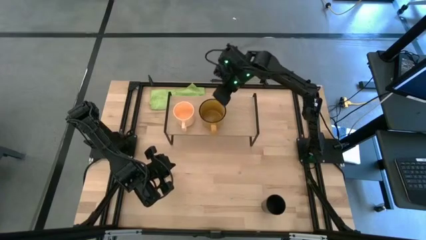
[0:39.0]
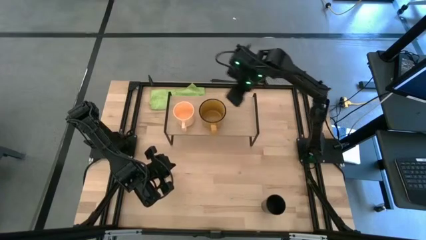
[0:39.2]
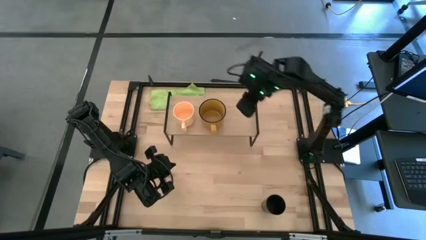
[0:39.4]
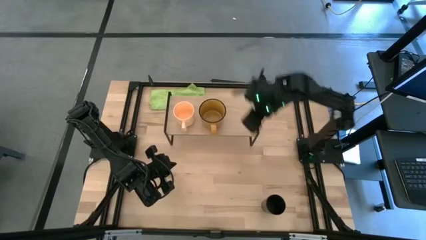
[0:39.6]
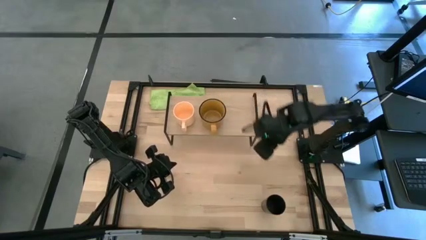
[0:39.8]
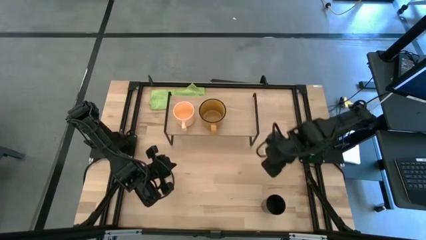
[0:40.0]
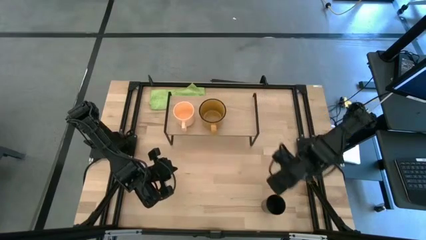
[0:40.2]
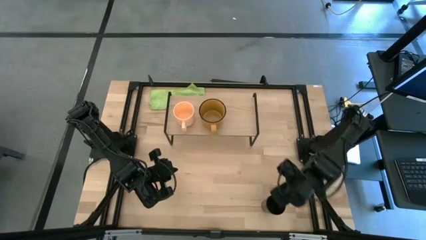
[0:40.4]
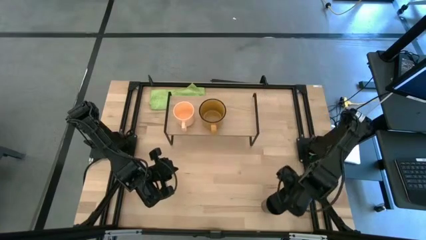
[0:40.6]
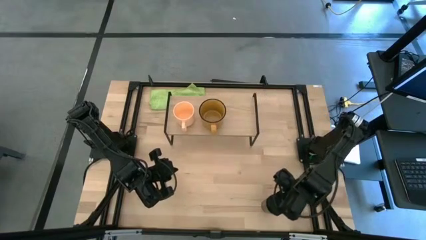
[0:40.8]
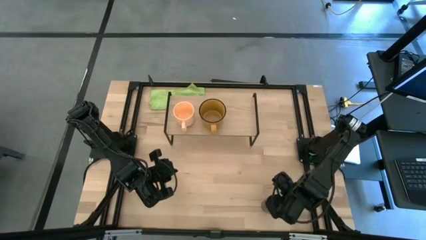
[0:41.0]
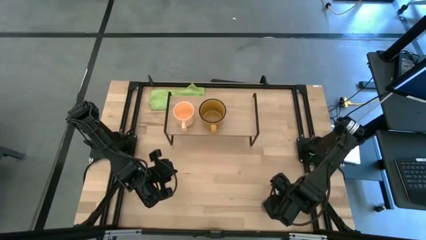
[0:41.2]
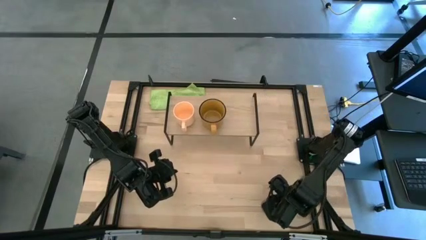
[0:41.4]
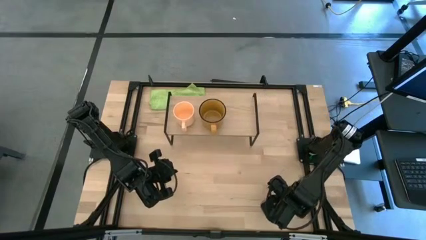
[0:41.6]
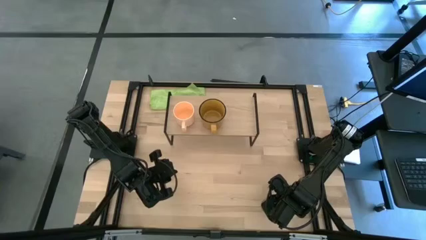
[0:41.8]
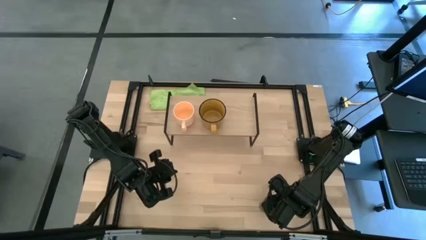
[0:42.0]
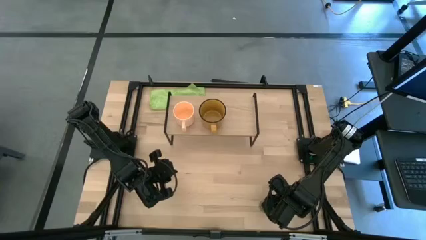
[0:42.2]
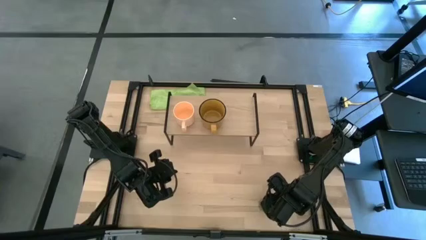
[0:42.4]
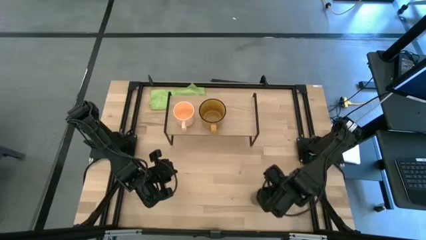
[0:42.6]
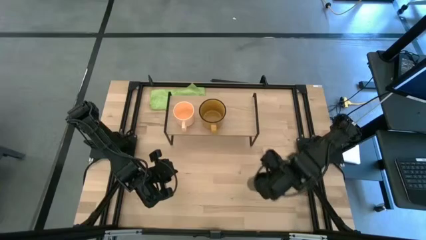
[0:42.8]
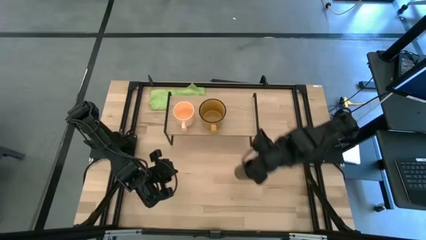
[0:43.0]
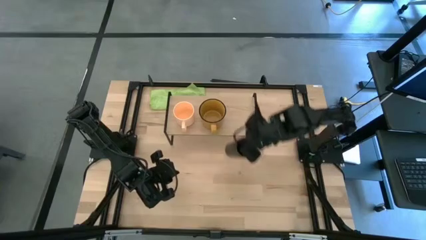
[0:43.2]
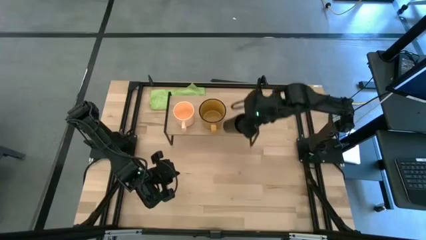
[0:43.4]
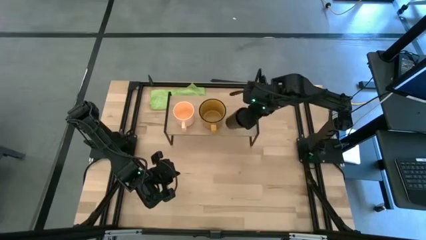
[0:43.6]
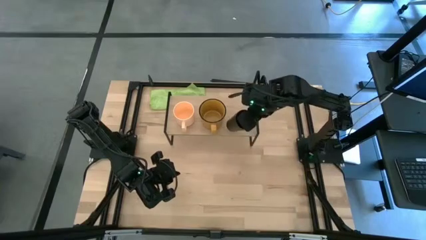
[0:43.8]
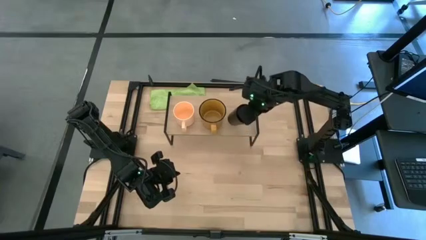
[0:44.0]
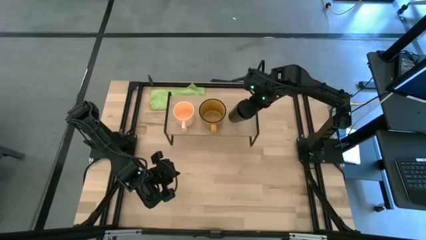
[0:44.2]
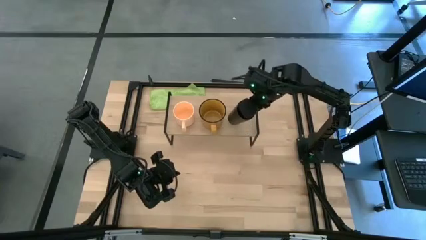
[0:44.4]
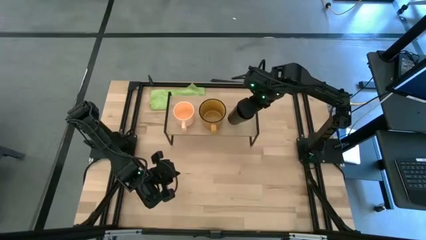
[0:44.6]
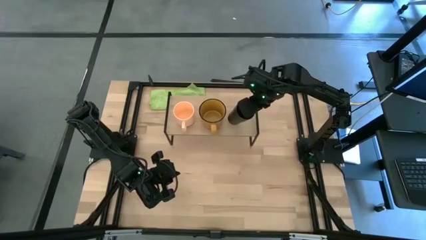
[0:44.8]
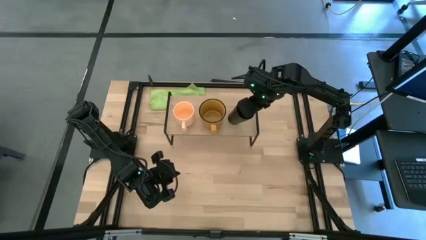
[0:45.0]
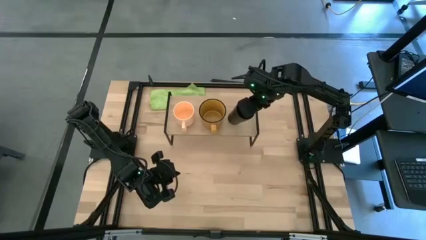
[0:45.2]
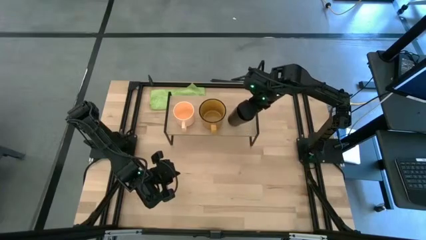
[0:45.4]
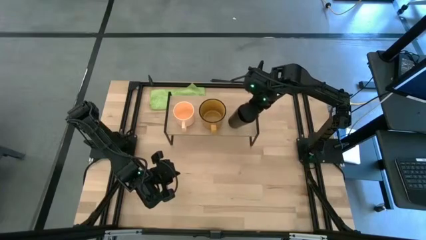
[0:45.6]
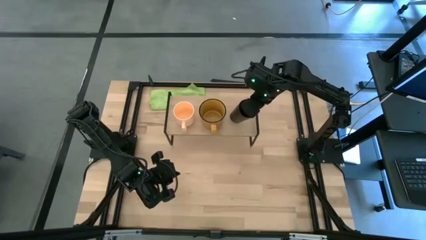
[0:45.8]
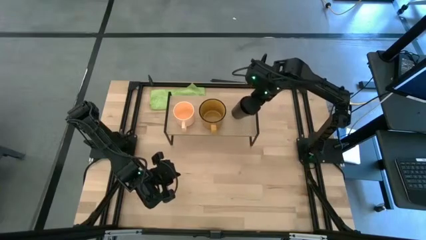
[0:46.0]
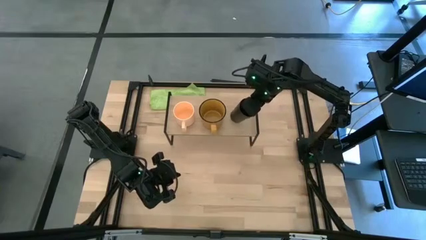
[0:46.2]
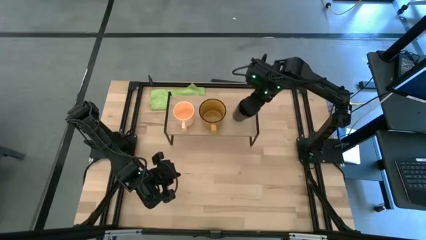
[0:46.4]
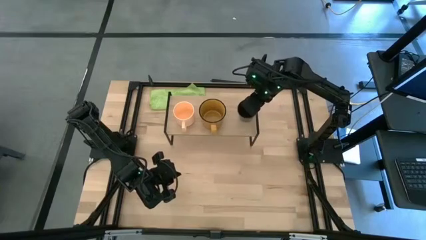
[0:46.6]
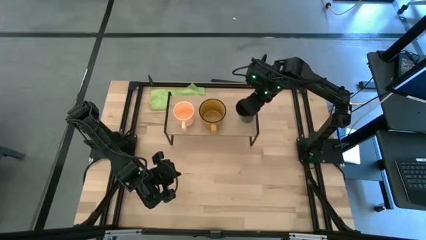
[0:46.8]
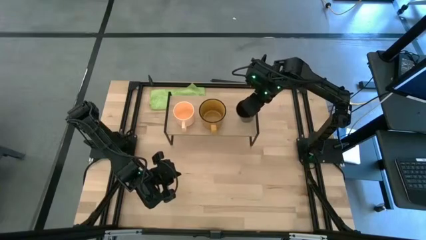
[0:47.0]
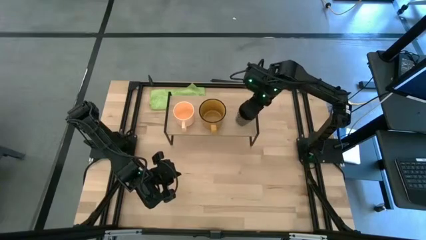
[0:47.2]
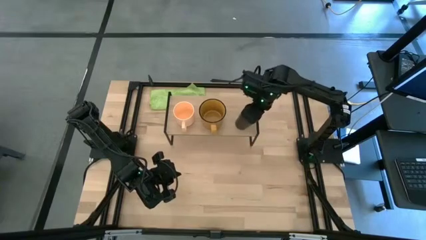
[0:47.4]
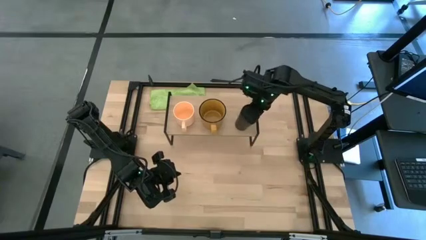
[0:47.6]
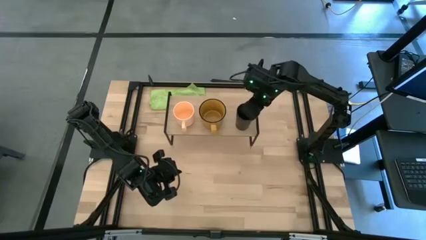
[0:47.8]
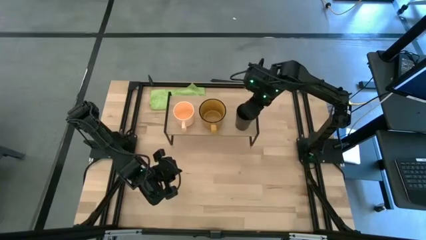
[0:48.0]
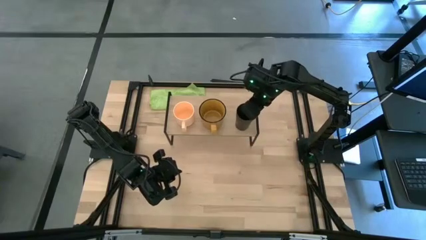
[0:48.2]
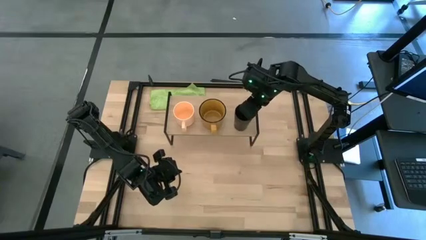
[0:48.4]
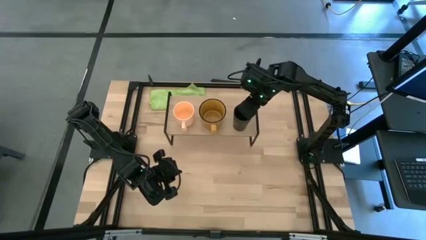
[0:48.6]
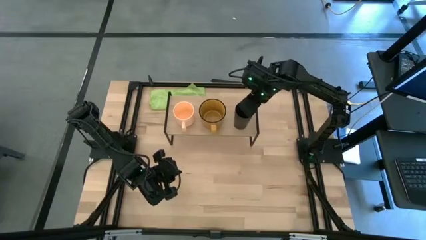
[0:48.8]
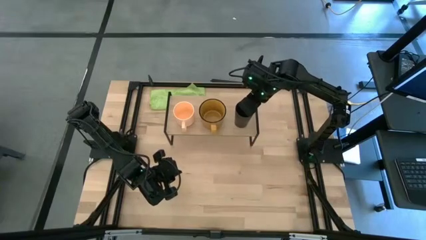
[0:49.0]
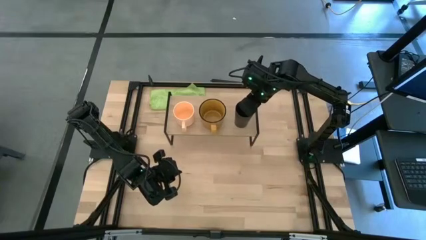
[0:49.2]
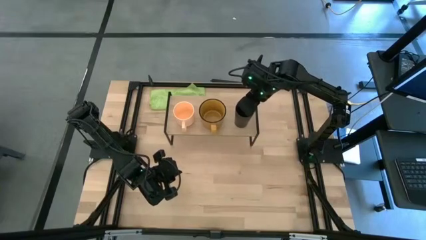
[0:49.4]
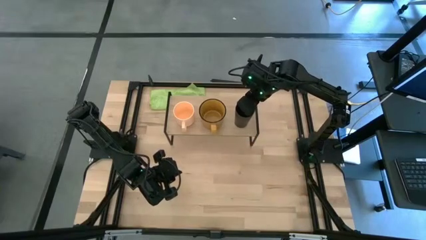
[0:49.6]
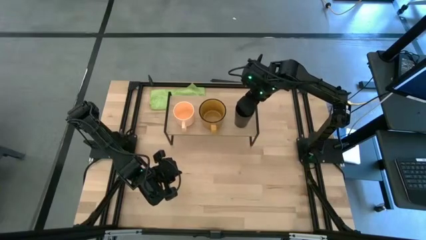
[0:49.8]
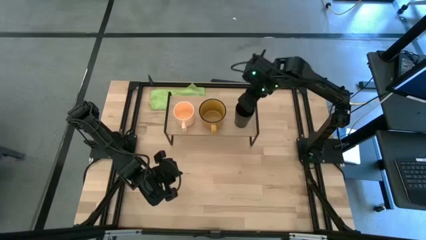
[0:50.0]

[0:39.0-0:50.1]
Task: Stack small to large cups/mugs on shelf
Put the black cup on the shelf

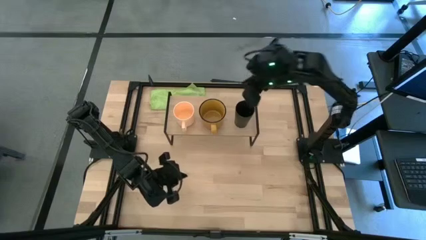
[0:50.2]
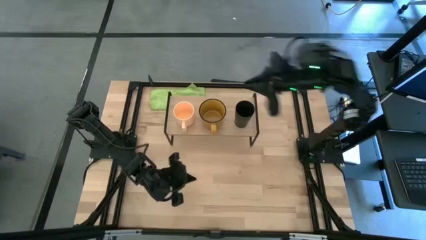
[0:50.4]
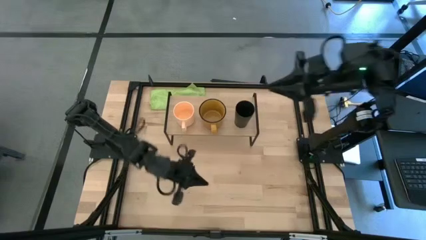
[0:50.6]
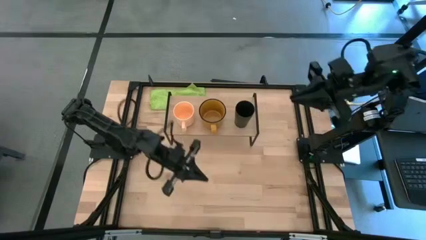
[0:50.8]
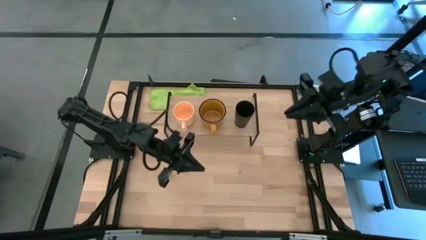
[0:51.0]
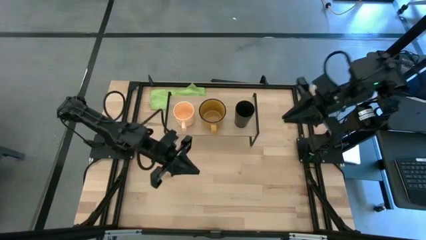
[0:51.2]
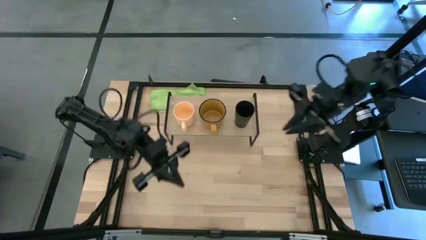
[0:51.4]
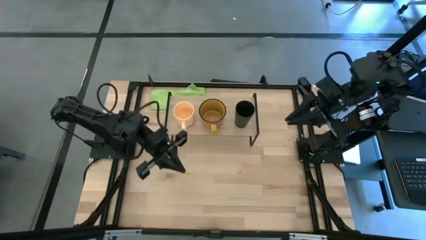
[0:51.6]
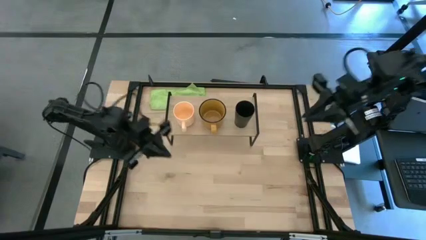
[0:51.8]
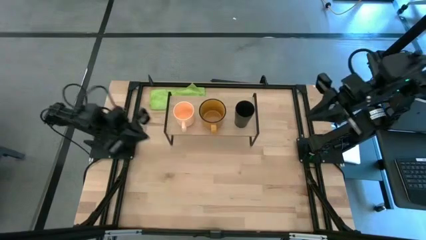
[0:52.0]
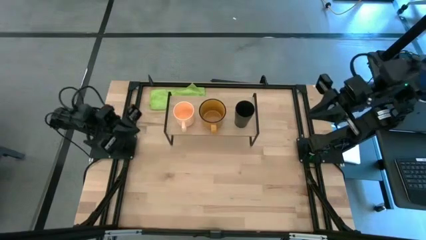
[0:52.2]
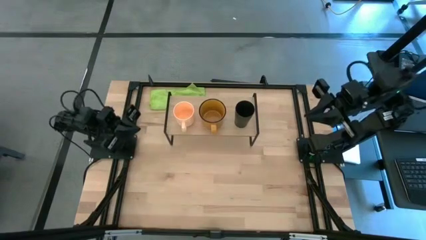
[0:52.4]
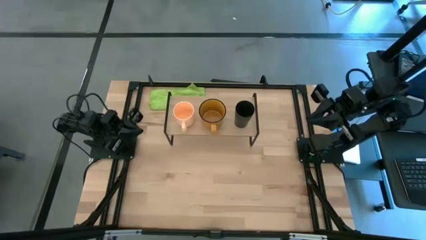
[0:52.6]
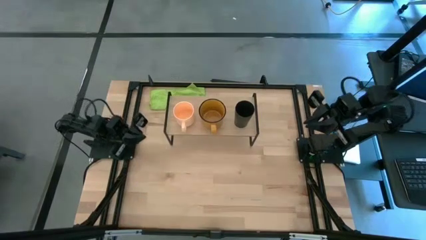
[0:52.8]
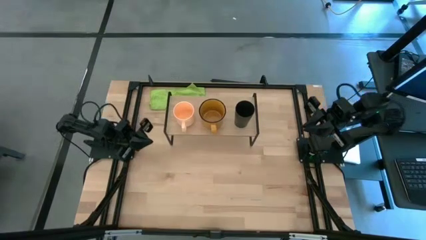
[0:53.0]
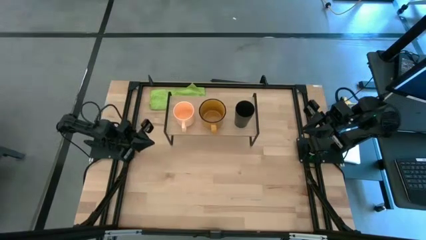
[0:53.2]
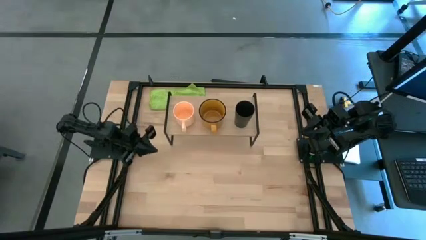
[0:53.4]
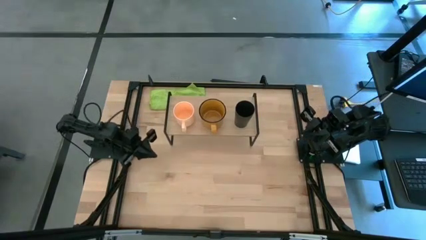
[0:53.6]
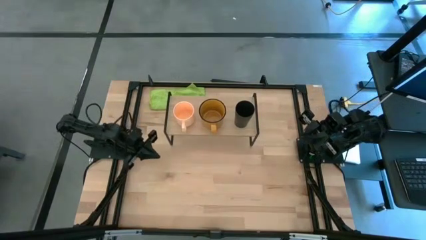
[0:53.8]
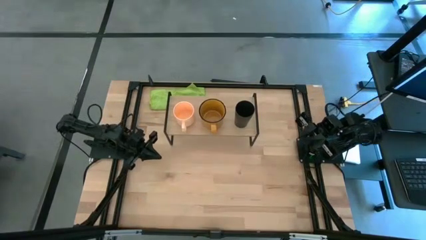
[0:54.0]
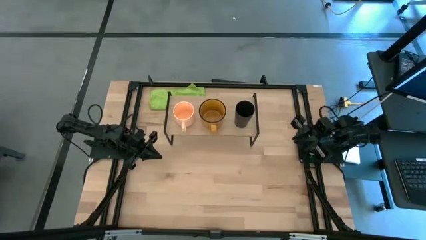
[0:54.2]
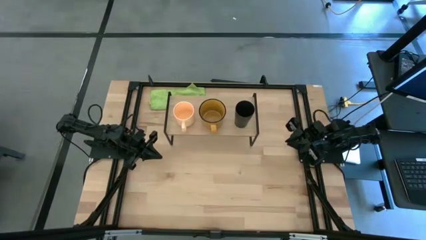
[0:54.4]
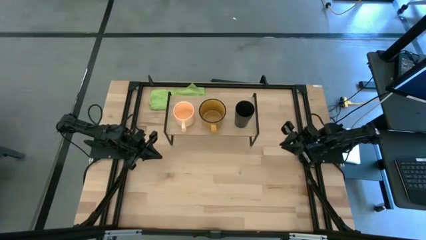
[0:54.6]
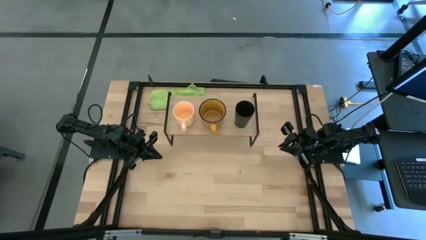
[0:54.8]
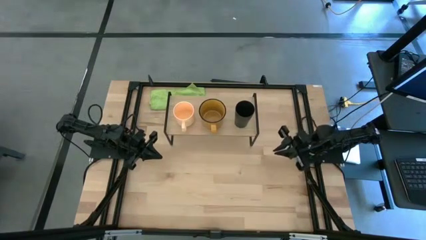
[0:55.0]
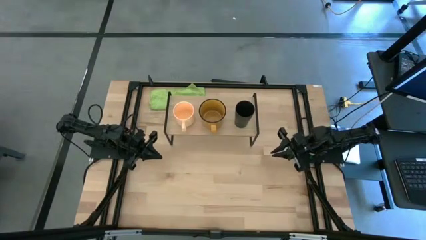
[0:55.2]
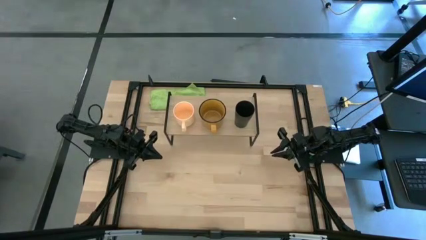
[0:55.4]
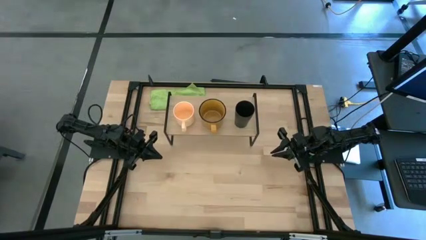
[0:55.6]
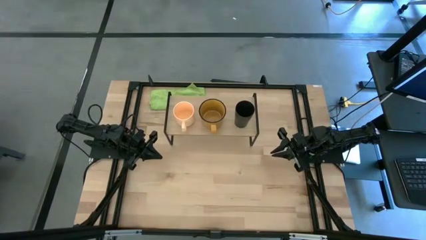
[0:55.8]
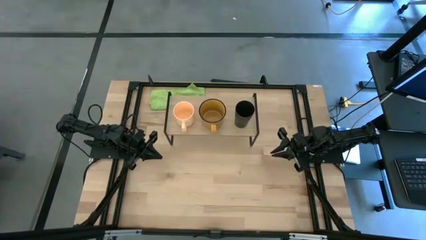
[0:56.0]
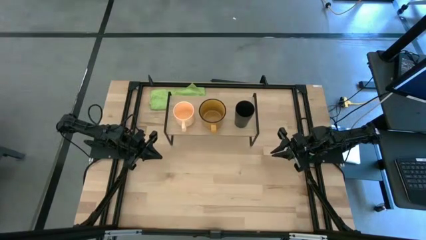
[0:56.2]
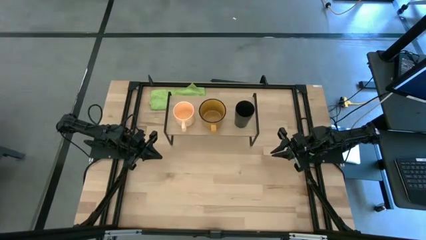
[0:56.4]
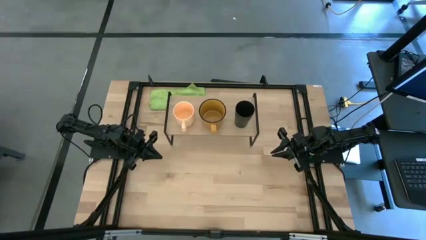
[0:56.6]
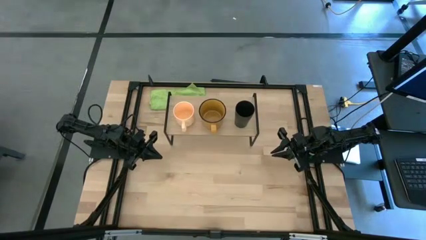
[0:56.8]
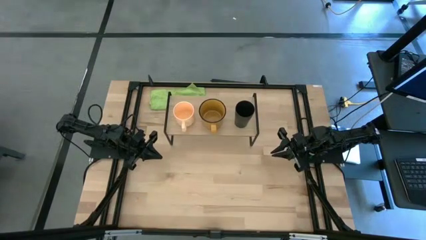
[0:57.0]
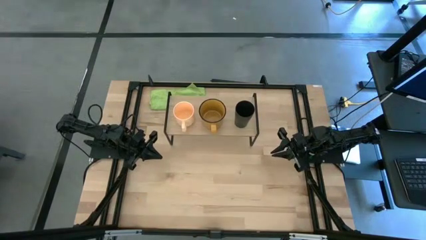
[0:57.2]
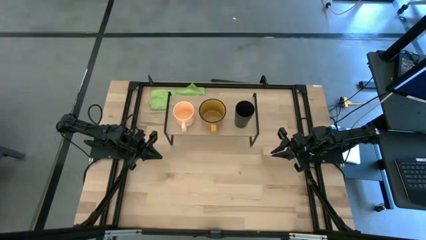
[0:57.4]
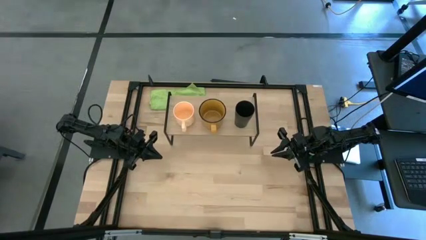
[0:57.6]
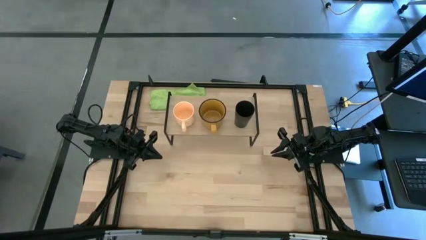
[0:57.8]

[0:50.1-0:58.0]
Return to Home Position
